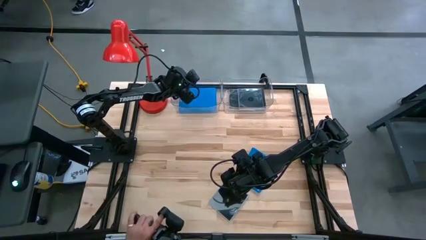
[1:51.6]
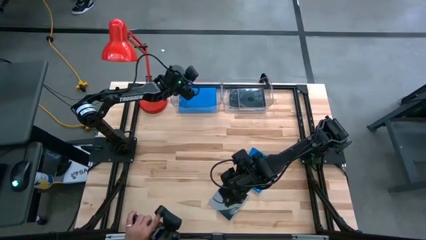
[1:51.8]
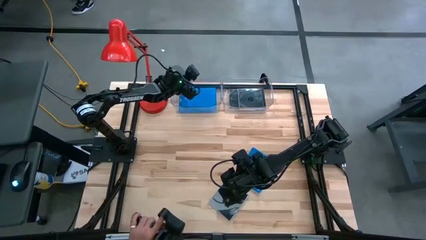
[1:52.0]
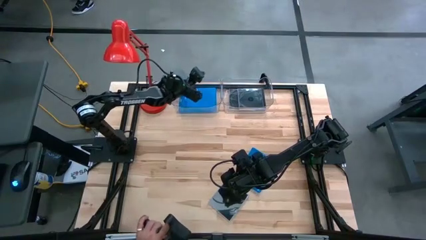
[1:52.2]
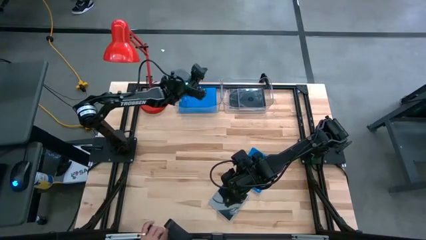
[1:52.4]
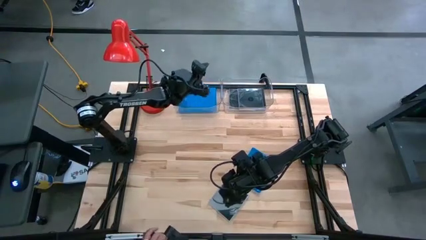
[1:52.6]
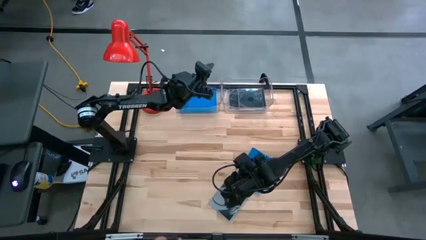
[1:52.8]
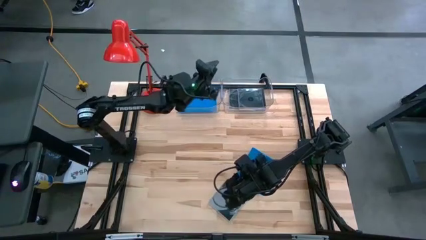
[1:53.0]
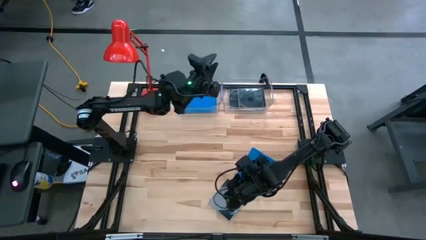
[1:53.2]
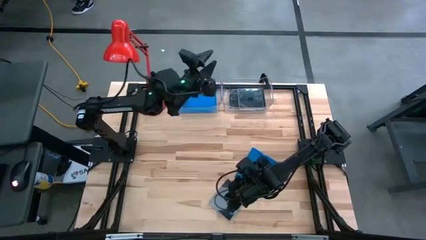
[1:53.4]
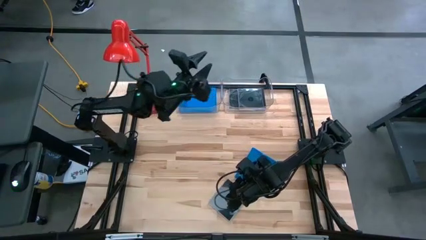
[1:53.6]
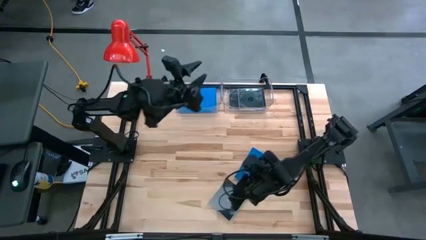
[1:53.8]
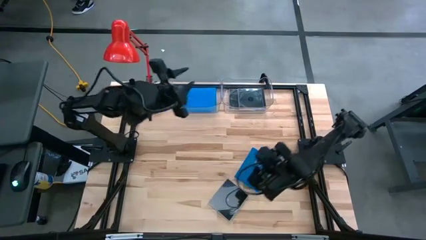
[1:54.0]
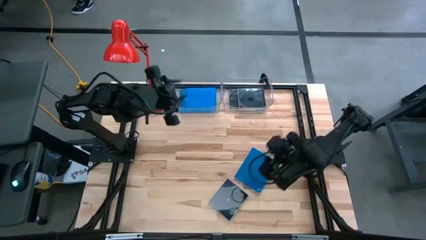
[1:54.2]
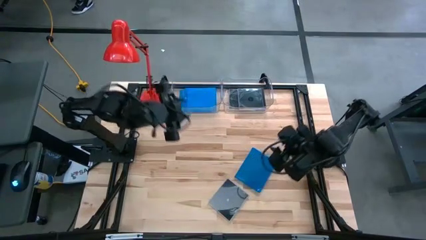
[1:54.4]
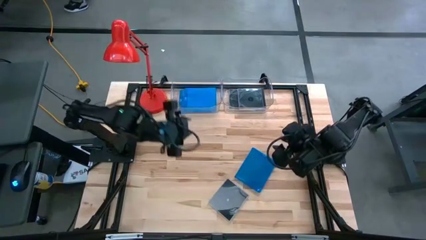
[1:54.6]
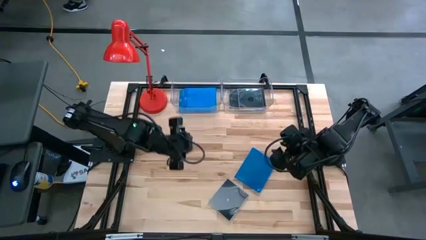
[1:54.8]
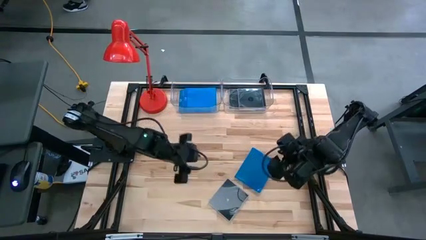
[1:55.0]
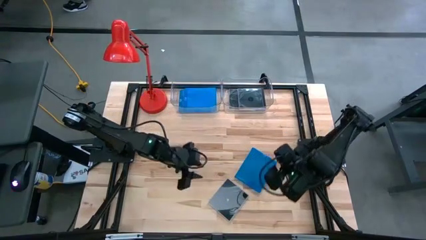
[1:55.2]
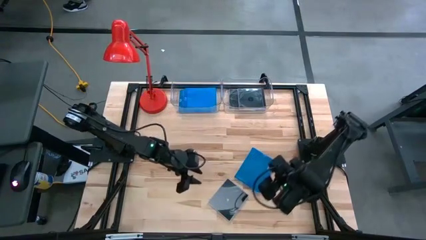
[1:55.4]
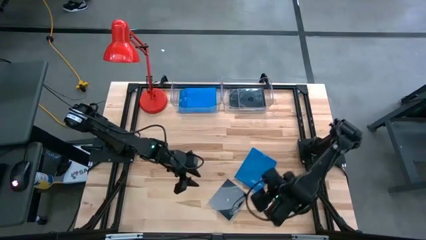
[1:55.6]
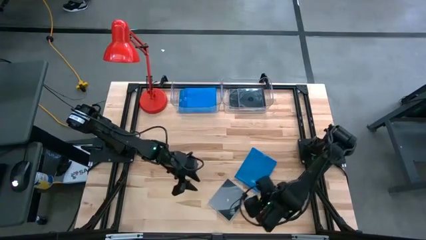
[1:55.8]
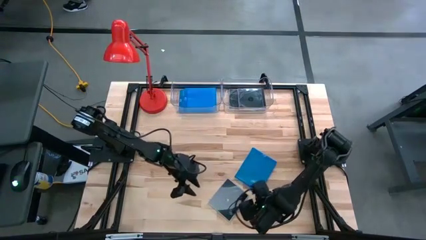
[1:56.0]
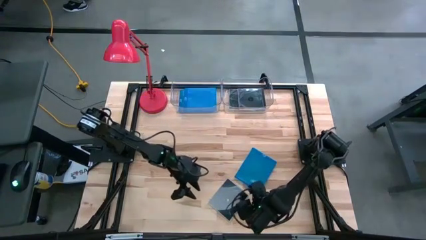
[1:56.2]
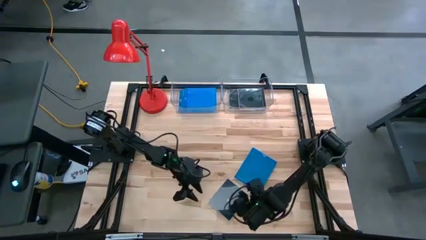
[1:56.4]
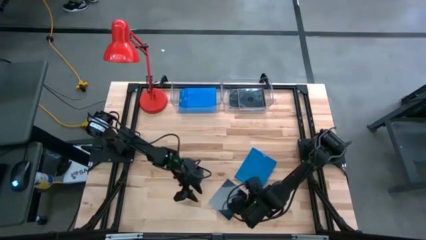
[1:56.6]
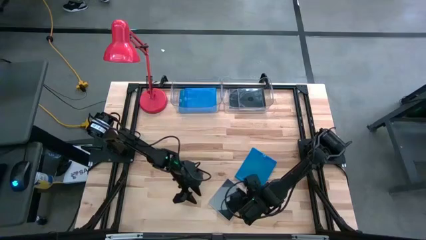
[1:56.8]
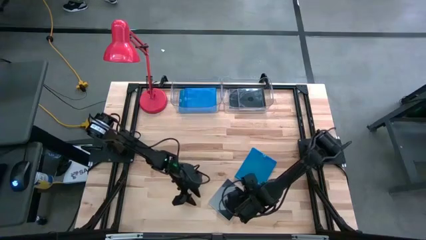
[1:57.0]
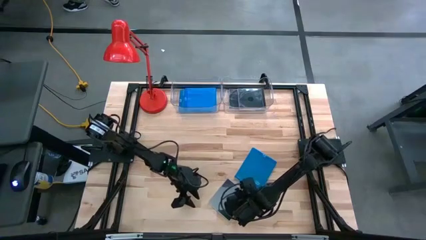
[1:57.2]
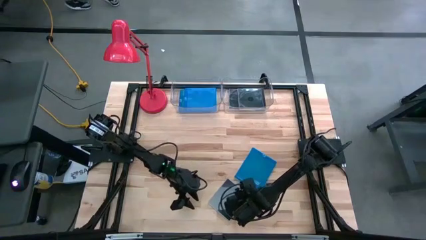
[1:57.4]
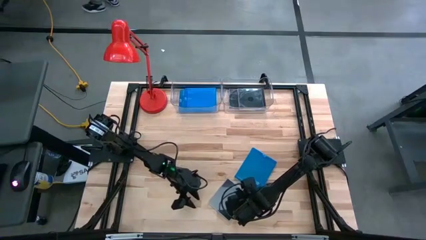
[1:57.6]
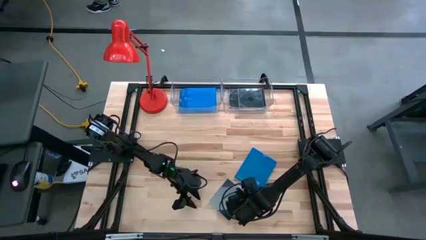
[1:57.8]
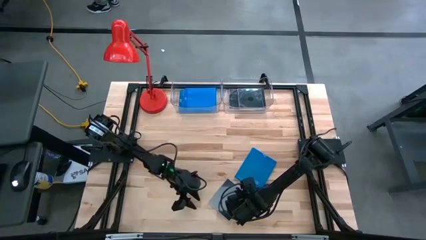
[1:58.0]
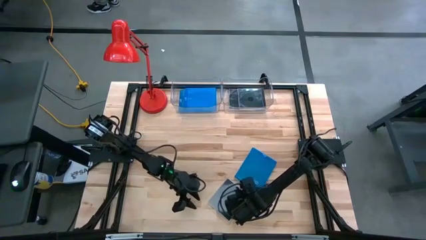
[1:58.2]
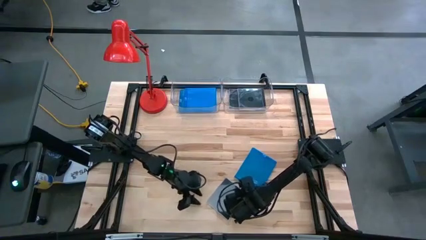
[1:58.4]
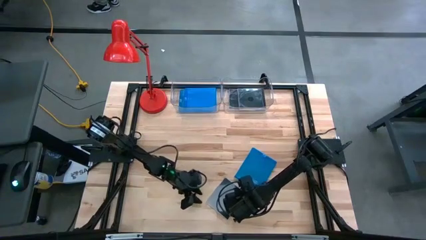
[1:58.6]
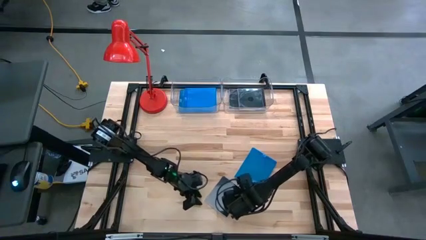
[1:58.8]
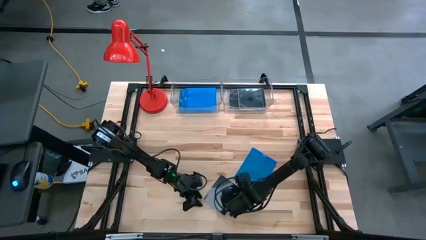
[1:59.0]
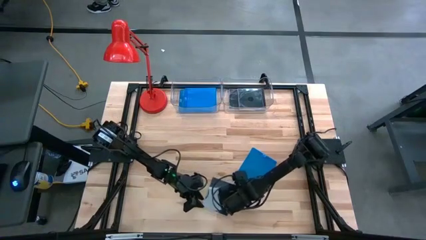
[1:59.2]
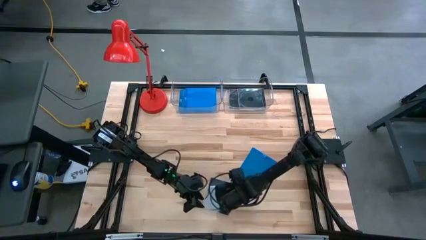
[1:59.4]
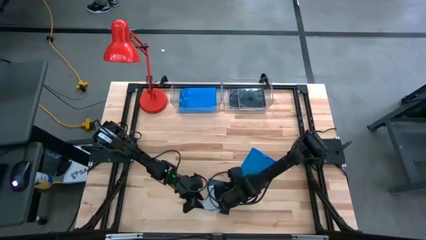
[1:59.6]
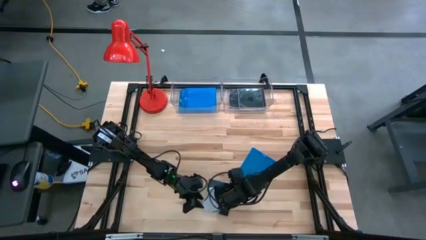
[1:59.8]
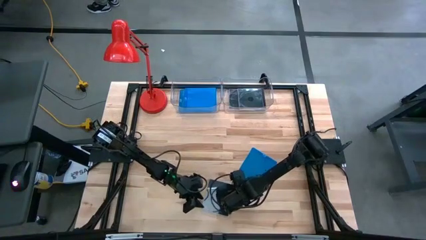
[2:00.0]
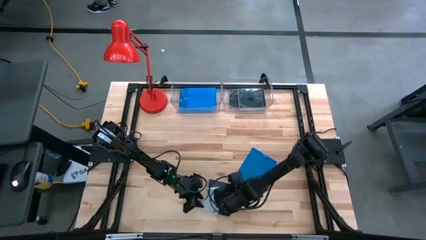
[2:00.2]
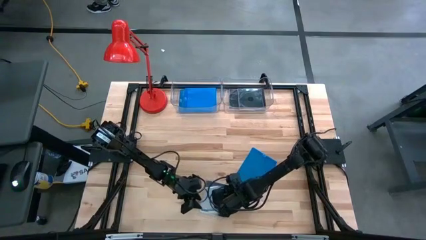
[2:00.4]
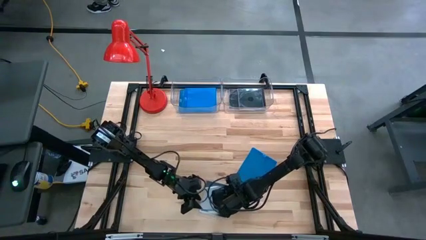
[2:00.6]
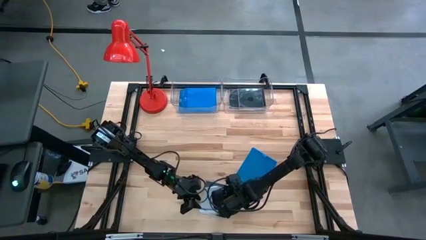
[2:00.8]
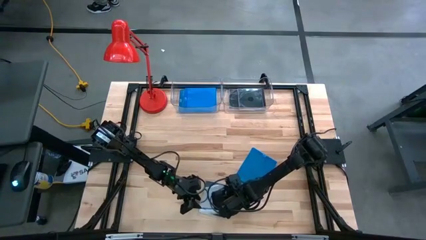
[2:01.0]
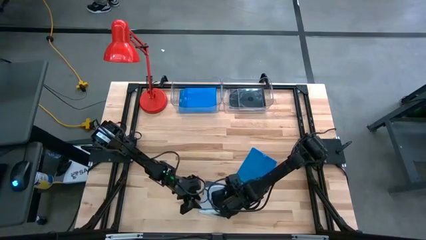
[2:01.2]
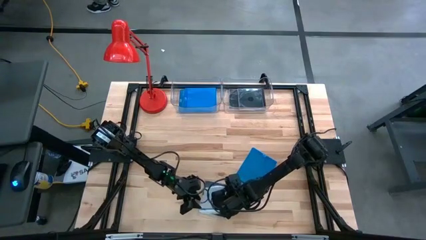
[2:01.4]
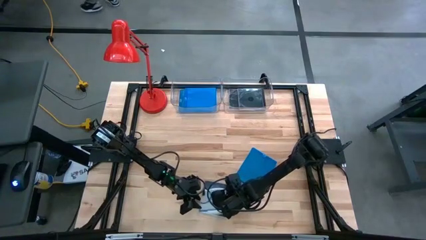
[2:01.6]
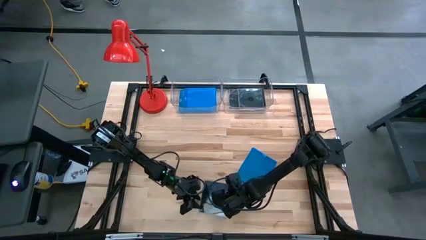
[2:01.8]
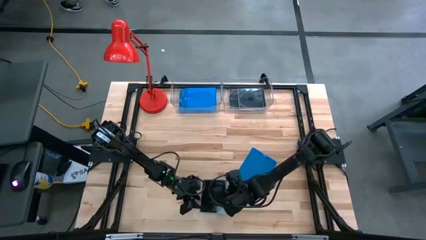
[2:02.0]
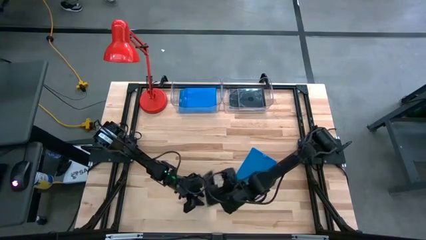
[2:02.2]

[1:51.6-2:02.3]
Task: Pick & place jewel cases by type
Put the black cd case into the right transparent bin

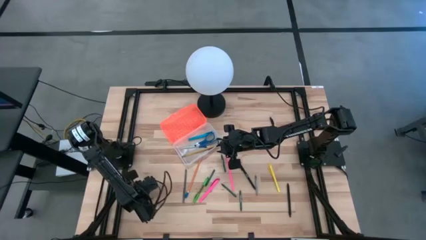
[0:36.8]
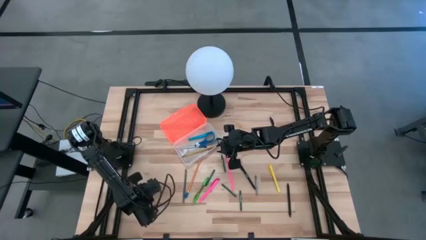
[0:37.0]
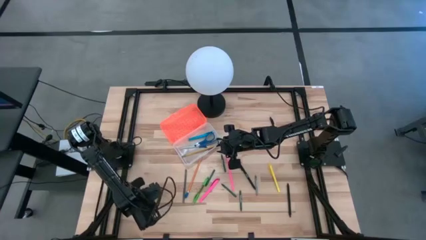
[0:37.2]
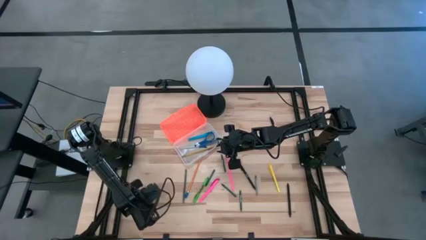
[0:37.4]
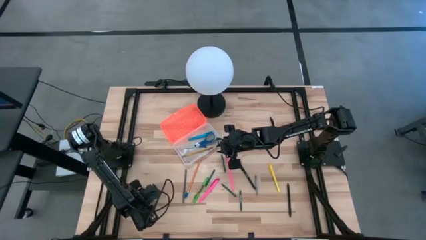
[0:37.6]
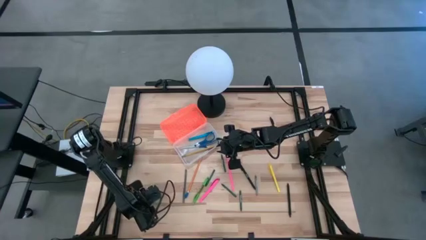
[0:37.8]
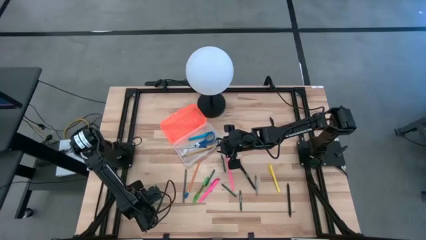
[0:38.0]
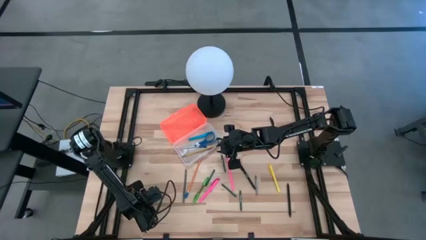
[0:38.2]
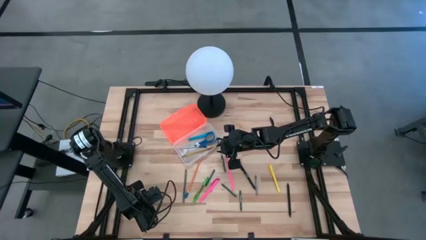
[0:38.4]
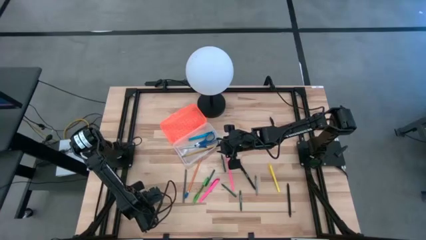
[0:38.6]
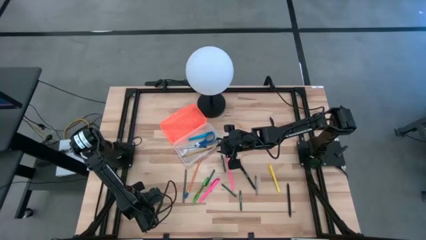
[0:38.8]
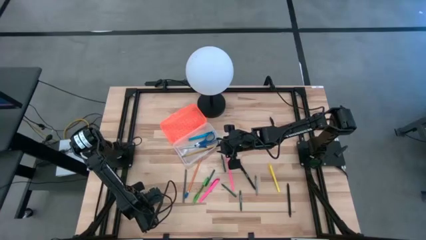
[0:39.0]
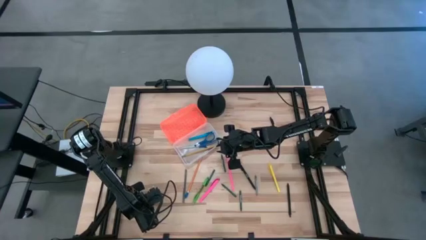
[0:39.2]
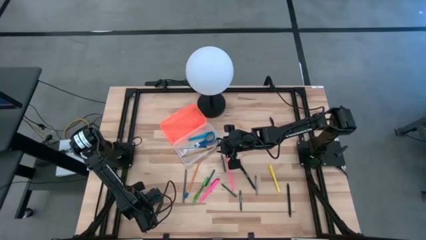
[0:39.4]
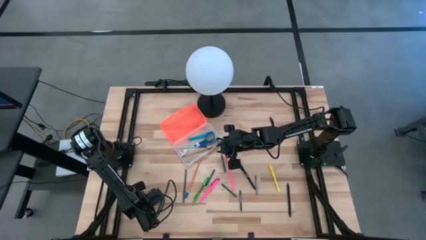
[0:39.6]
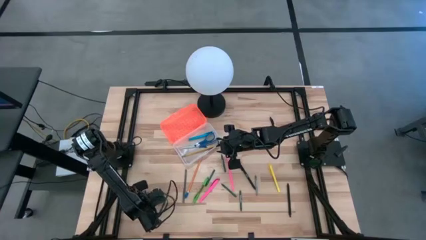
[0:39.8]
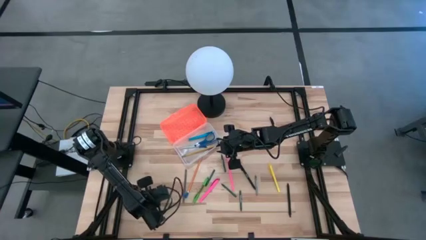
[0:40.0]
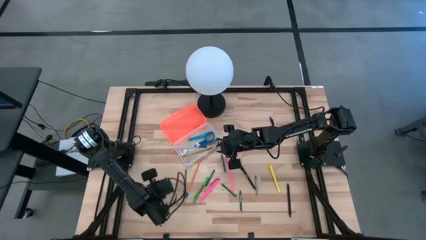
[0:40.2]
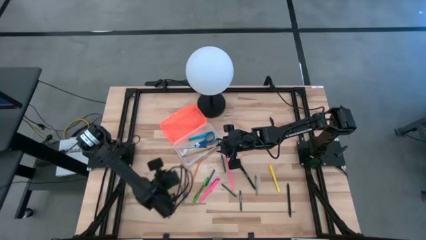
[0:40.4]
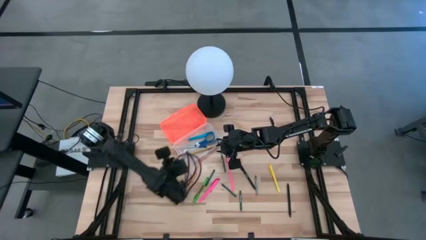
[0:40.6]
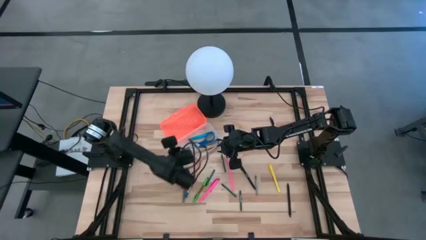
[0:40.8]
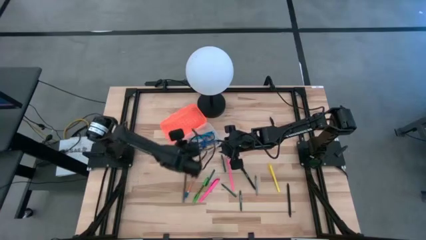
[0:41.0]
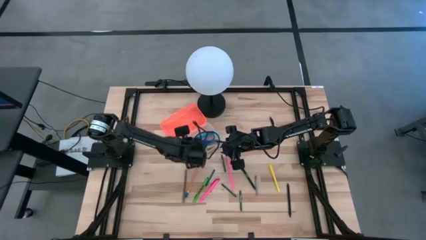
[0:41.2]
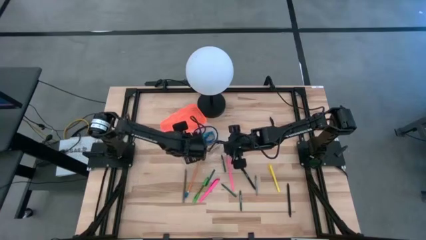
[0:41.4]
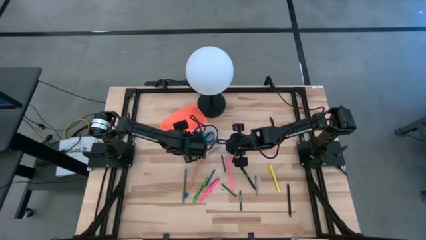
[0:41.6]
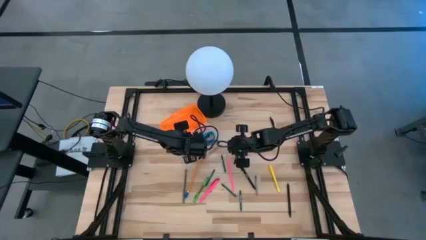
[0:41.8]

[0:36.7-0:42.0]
Task: Pick & place school supplies into a supply box
Put the left gray crayon into the orange supply box
